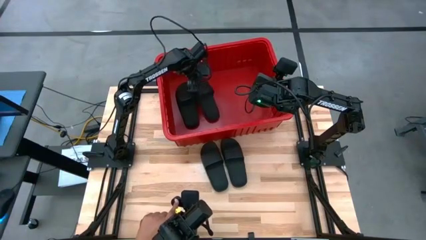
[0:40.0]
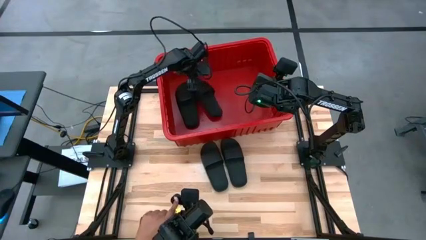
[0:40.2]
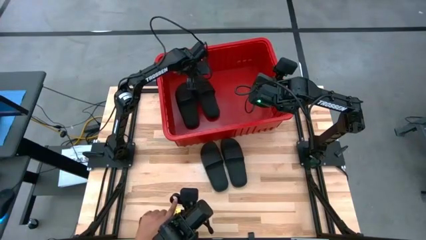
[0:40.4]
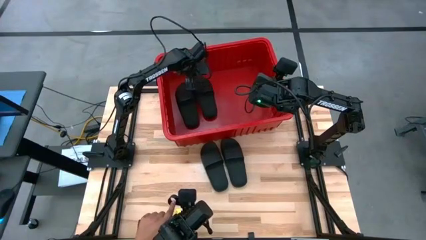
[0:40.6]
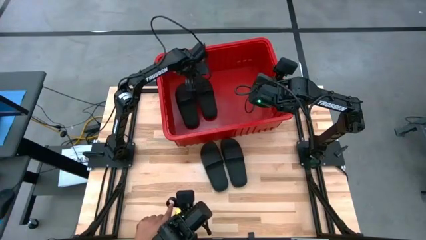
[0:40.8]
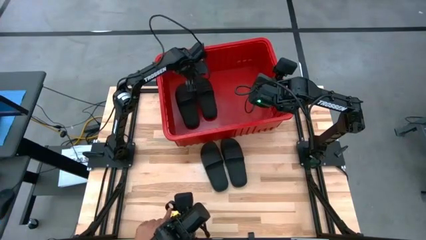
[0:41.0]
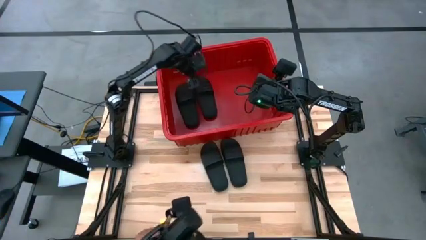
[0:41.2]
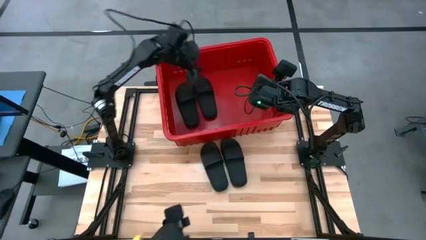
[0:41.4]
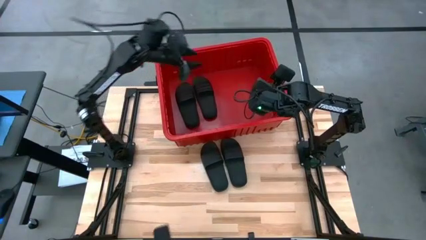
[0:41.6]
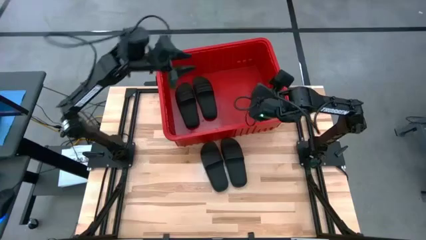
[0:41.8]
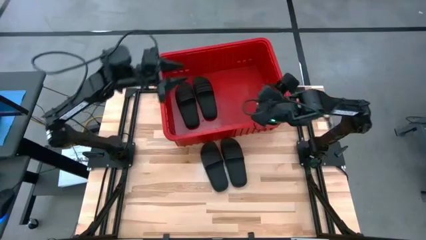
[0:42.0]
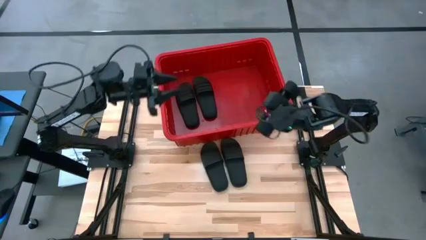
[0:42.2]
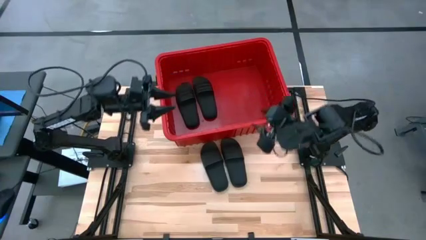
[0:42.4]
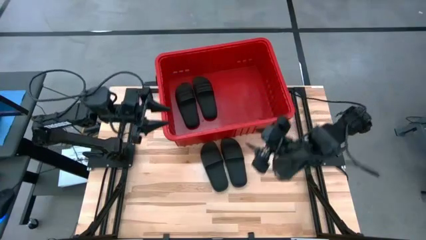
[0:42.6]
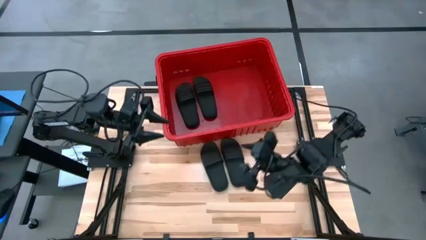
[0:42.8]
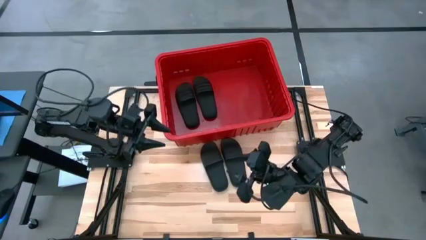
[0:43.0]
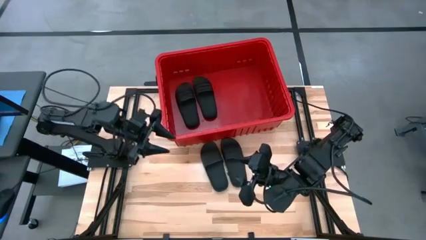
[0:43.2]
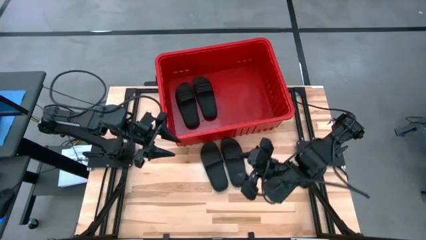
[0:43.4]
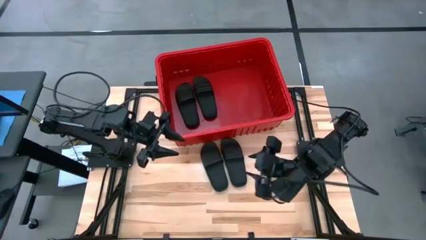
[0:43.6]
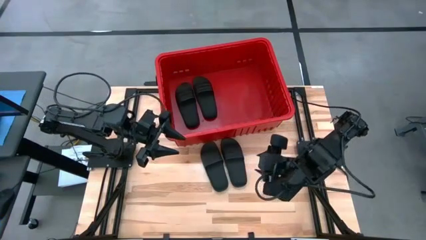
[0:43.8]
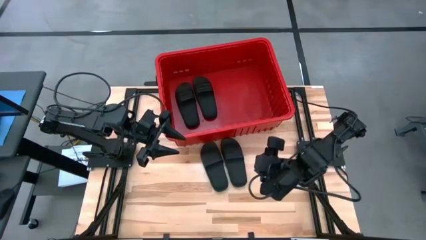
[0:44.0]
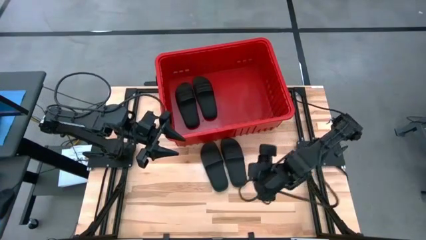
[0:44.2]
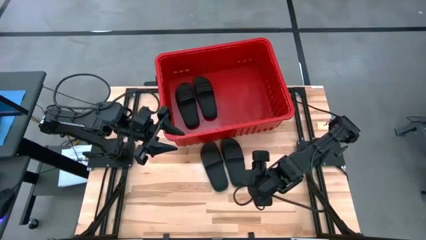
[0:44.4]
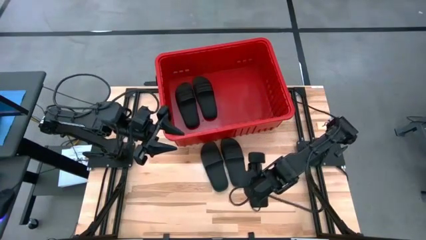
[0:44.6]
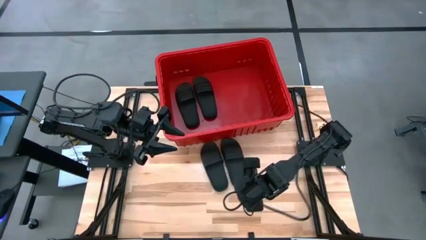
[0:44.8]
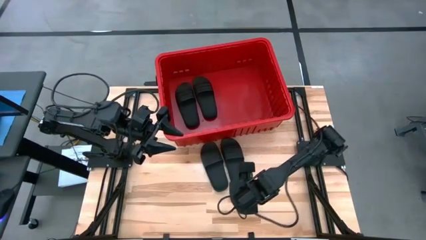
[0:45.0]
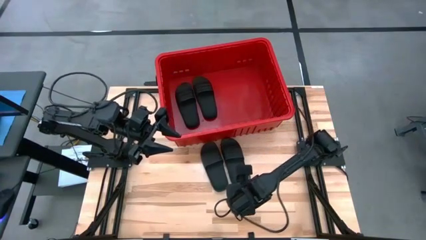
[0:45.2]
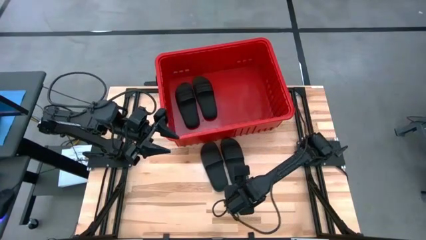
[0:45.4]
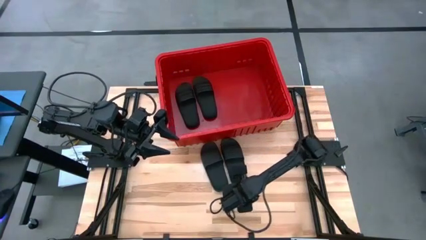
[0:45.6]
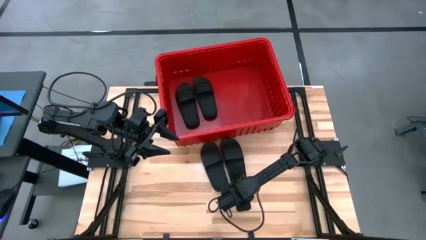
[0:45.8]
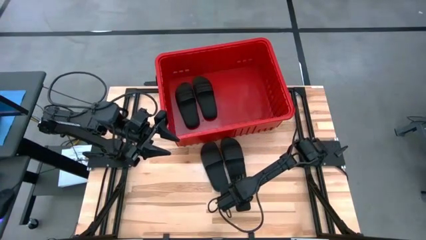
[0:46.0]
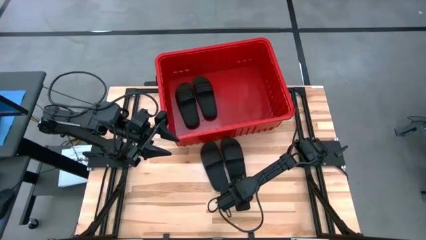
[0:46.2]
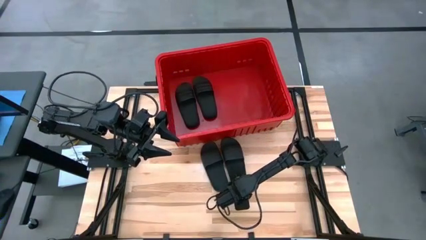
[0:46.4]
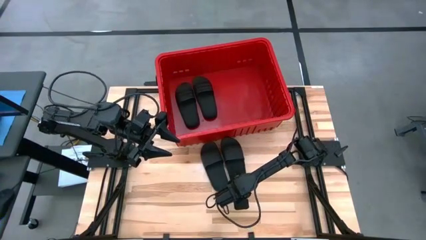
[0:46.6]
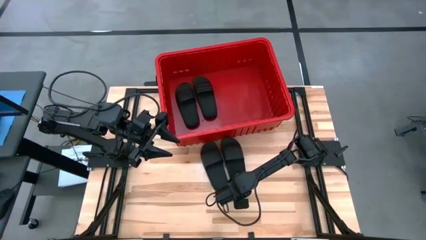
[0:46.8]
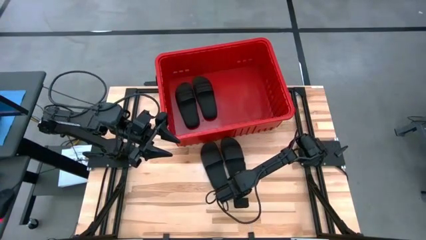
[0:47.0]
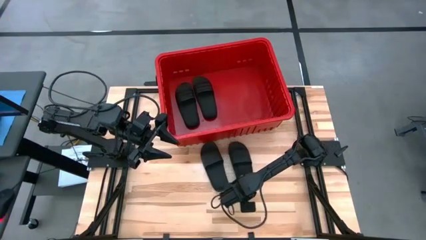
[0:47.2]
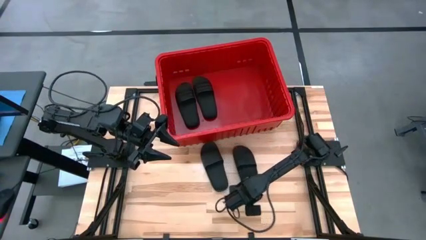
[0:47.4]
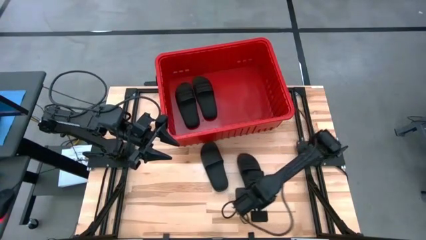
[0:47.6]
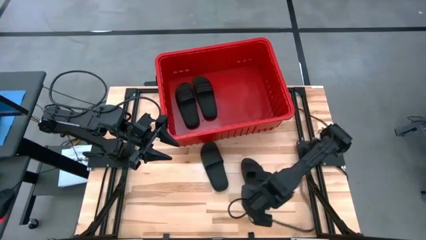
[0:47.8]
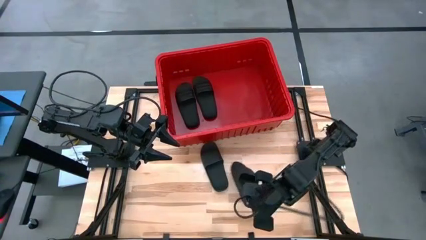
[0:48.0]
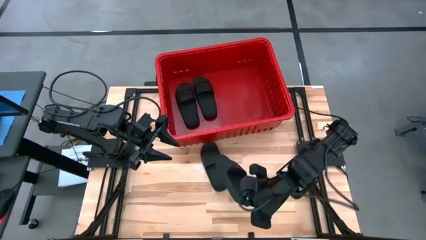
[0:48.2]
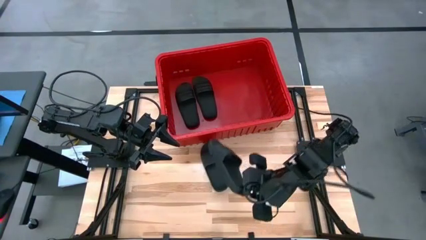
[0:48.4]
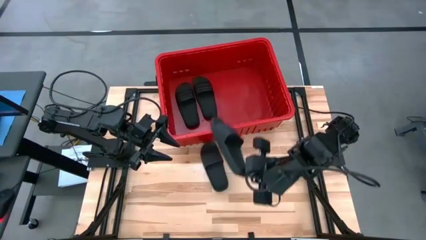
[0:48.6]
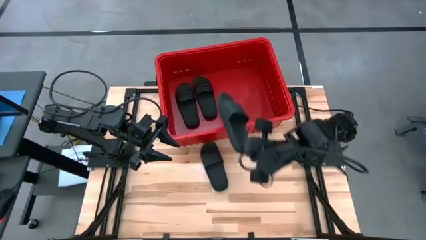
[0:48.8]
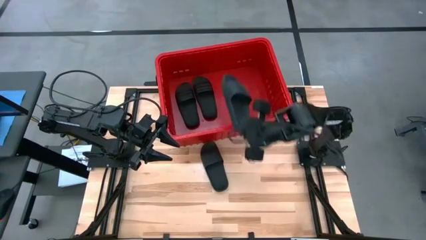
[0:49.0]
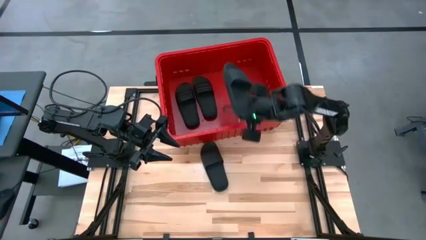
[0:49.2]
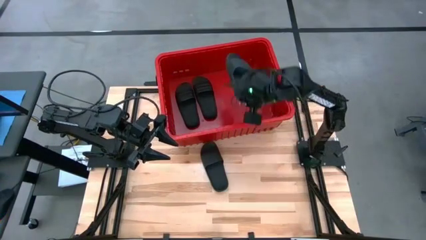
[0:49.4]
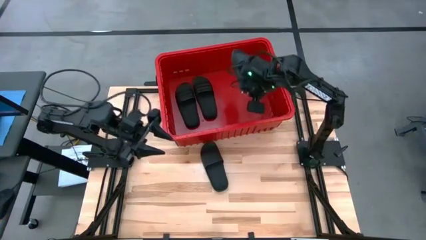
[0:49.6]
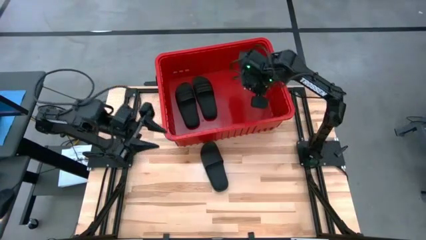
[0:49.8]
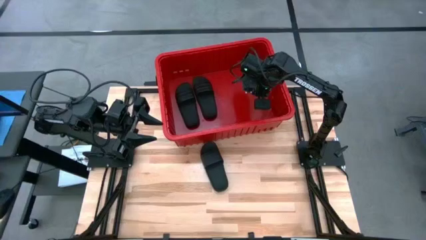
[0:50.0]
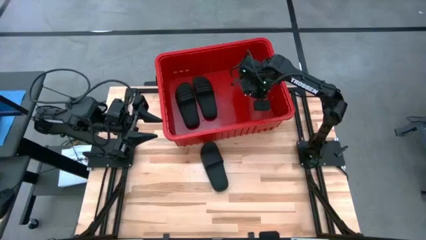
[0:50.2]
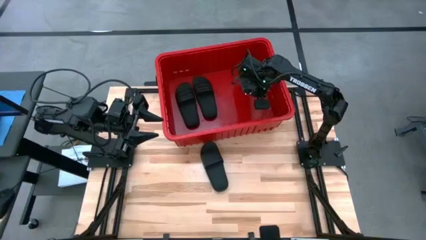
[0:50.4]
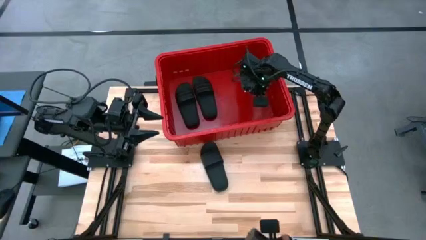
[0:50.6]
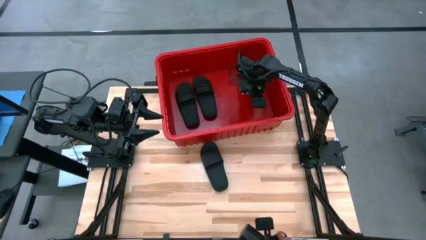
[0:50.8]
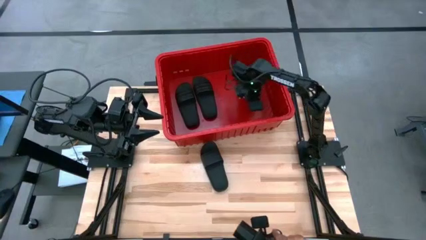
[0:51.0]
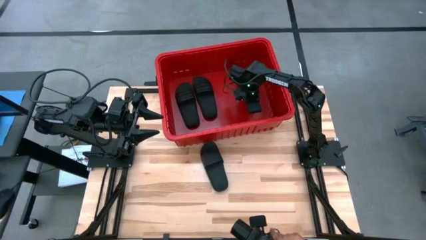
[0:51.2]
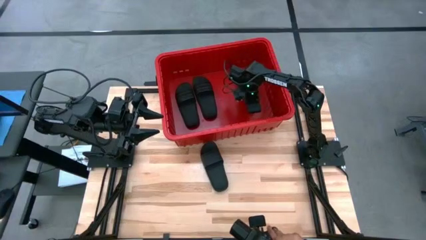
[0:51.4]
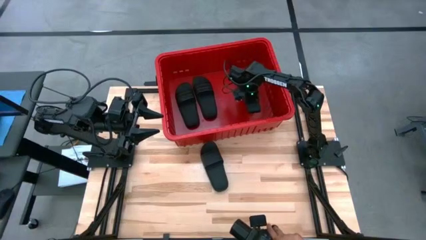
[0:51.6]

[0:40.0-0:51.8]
Task: Pick and place slides into bin
Put the black slides into the red bin
